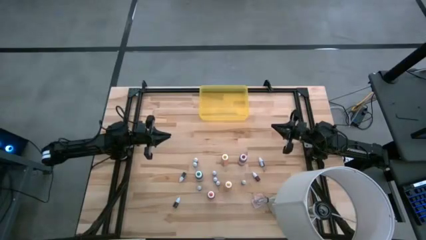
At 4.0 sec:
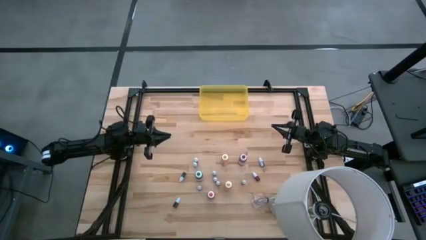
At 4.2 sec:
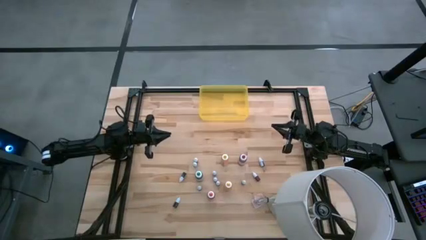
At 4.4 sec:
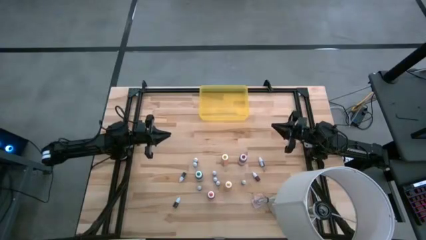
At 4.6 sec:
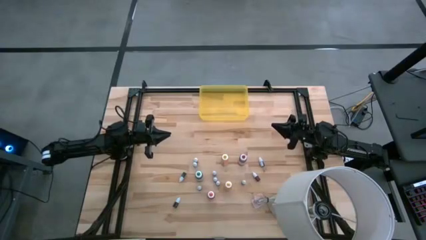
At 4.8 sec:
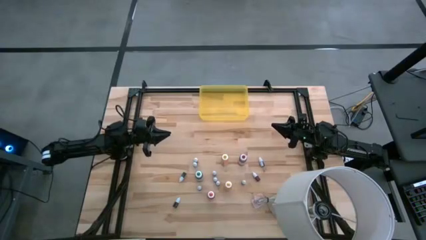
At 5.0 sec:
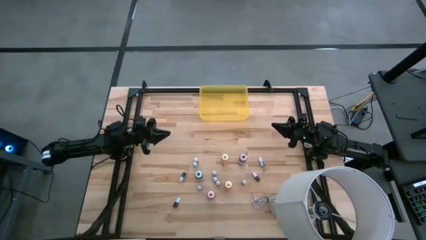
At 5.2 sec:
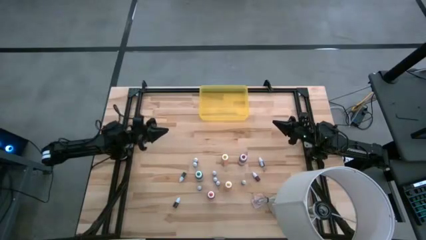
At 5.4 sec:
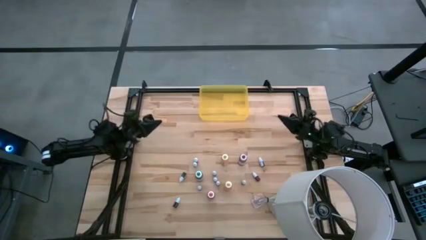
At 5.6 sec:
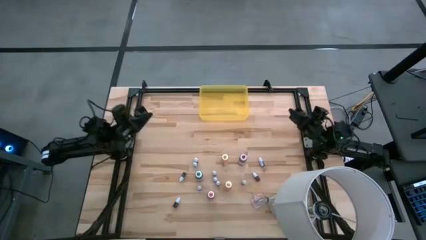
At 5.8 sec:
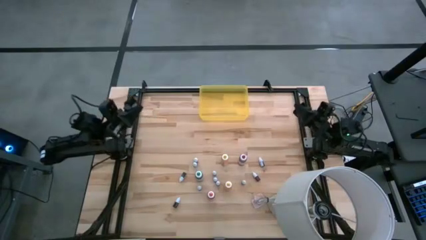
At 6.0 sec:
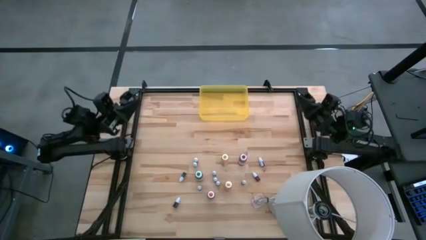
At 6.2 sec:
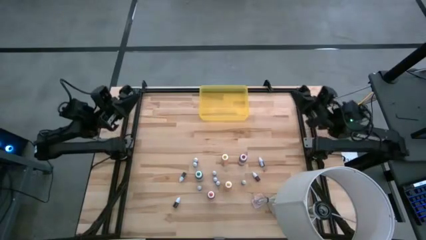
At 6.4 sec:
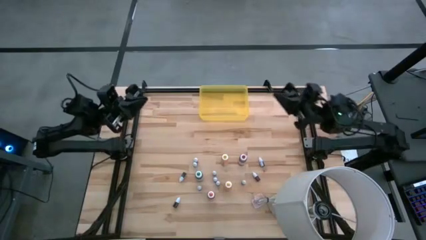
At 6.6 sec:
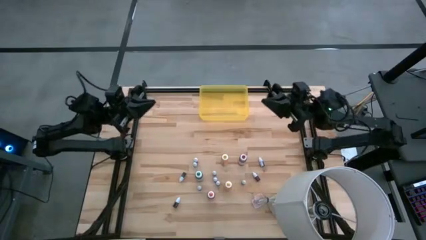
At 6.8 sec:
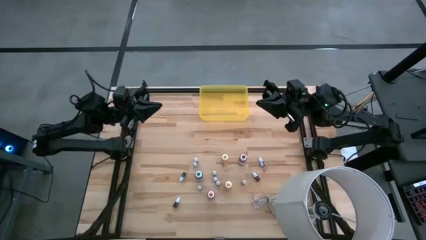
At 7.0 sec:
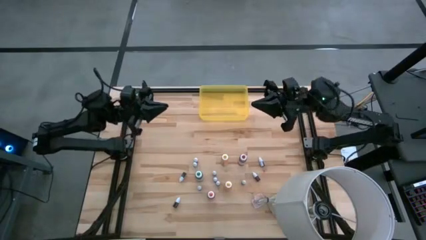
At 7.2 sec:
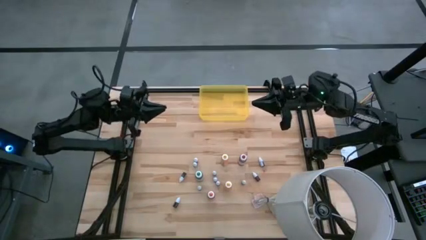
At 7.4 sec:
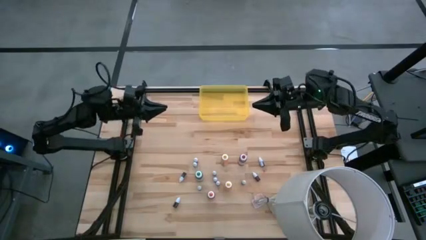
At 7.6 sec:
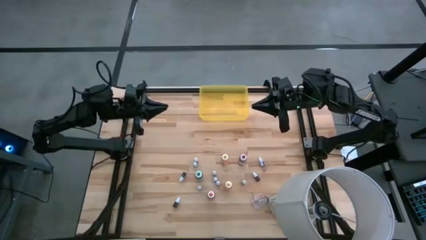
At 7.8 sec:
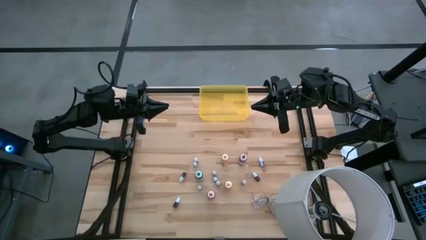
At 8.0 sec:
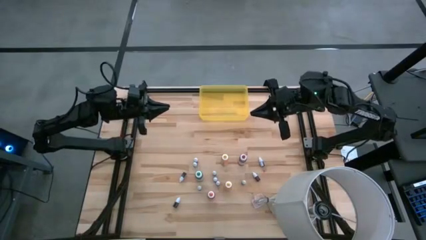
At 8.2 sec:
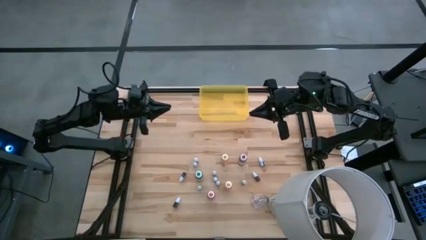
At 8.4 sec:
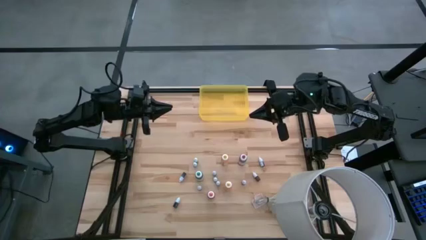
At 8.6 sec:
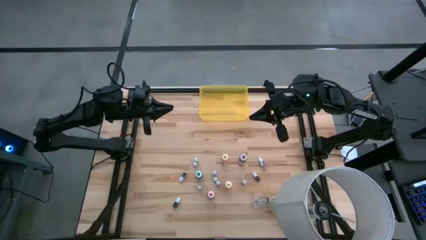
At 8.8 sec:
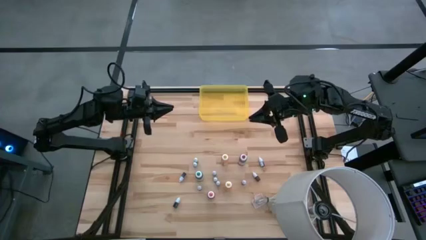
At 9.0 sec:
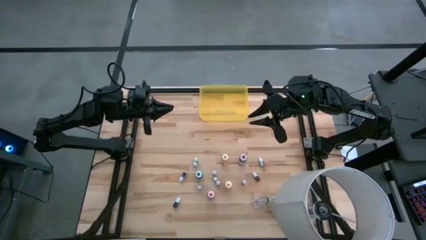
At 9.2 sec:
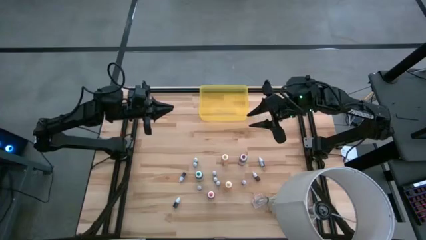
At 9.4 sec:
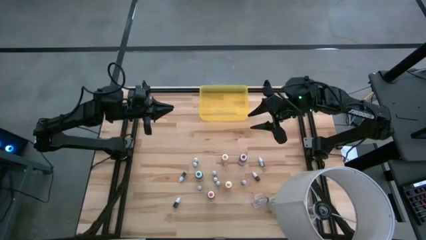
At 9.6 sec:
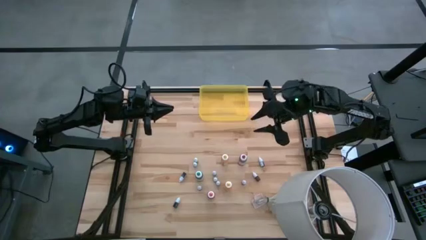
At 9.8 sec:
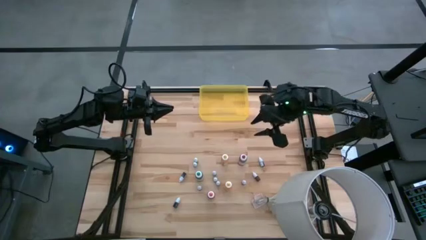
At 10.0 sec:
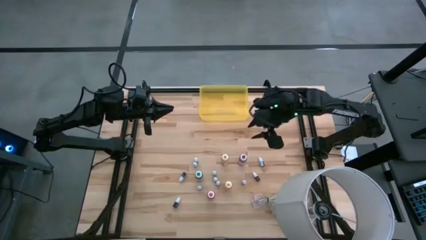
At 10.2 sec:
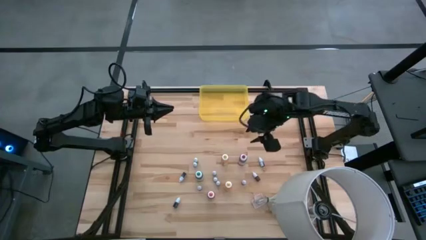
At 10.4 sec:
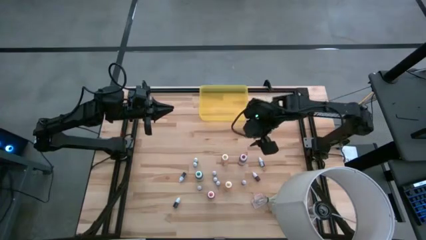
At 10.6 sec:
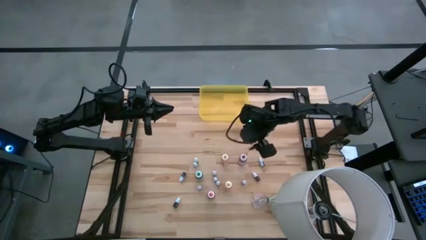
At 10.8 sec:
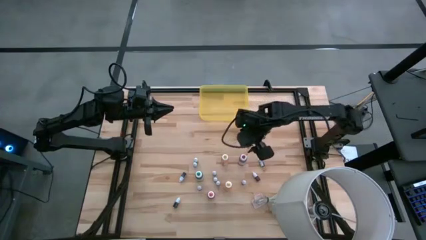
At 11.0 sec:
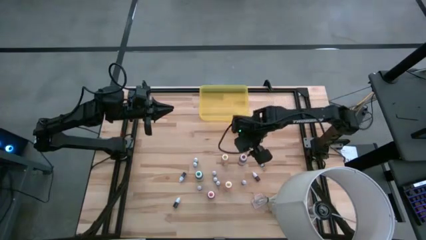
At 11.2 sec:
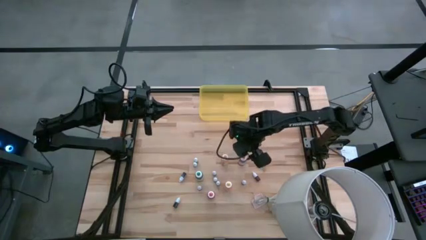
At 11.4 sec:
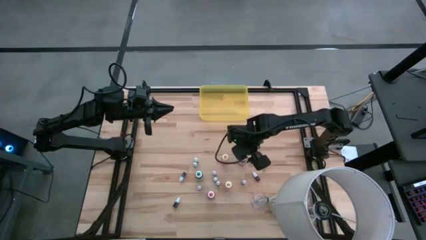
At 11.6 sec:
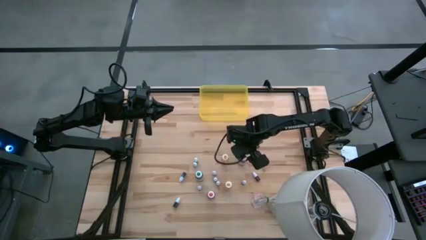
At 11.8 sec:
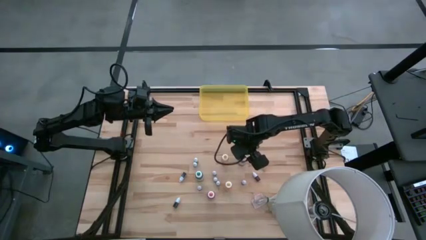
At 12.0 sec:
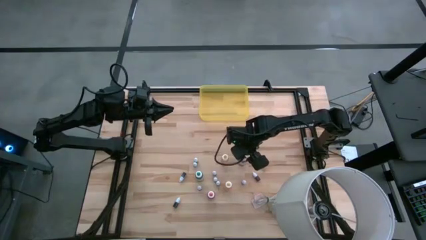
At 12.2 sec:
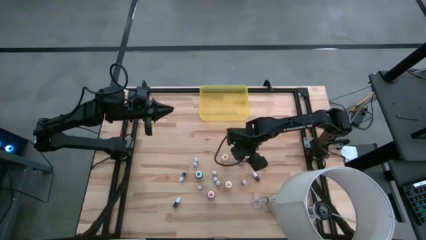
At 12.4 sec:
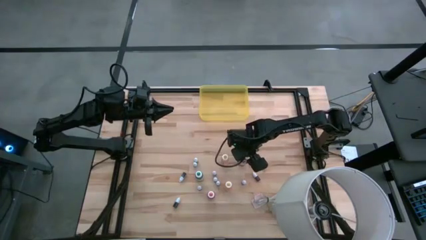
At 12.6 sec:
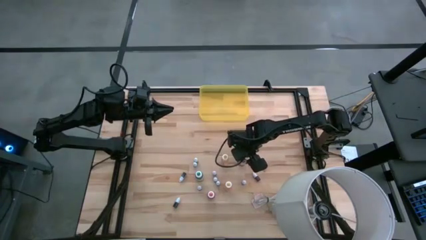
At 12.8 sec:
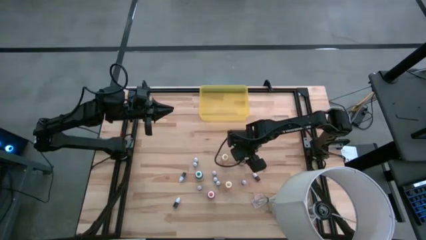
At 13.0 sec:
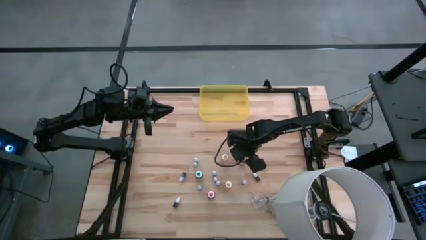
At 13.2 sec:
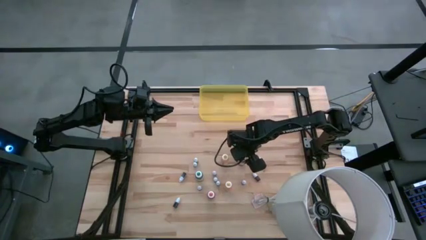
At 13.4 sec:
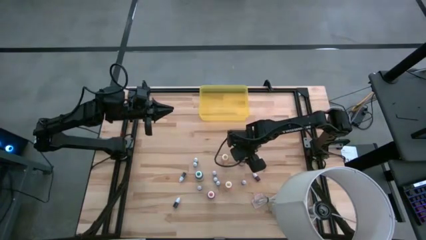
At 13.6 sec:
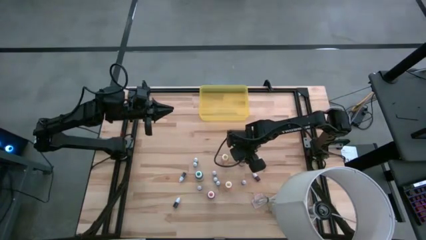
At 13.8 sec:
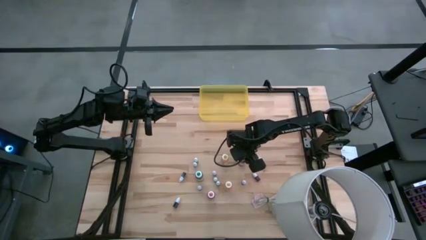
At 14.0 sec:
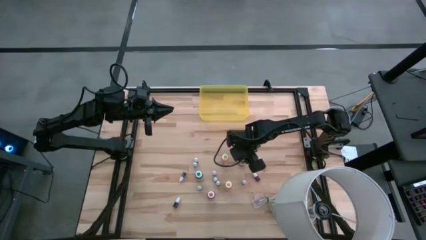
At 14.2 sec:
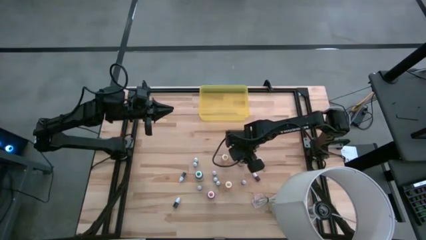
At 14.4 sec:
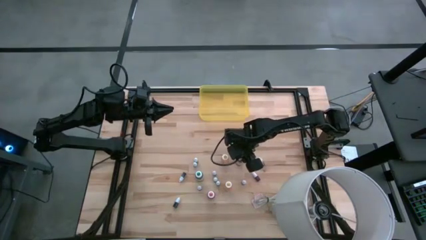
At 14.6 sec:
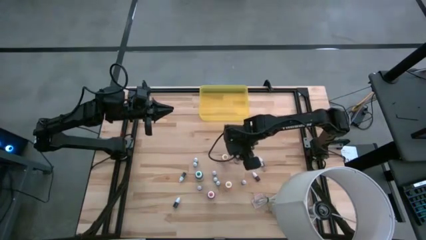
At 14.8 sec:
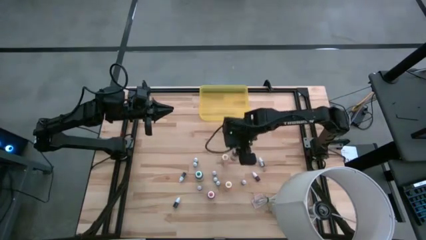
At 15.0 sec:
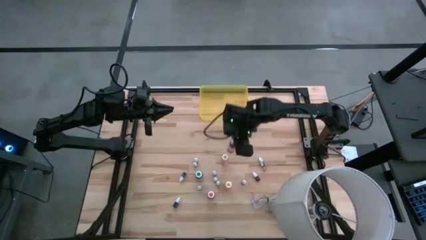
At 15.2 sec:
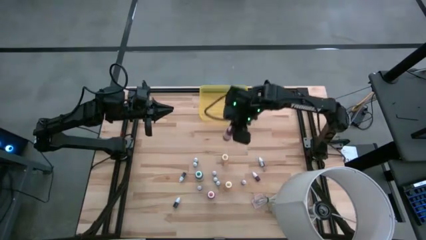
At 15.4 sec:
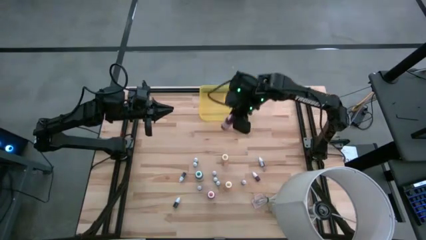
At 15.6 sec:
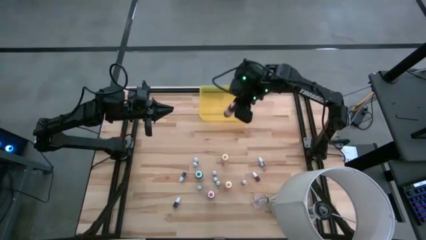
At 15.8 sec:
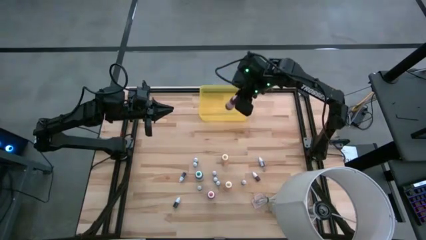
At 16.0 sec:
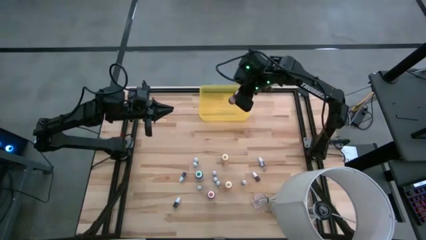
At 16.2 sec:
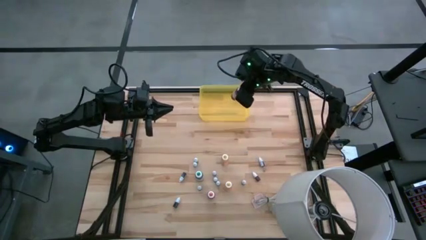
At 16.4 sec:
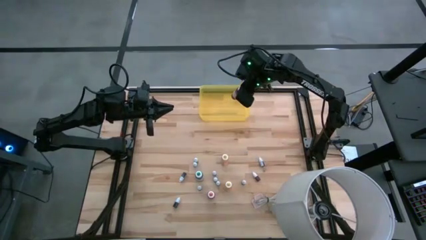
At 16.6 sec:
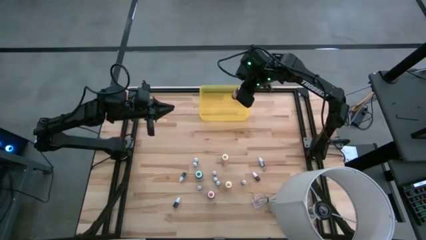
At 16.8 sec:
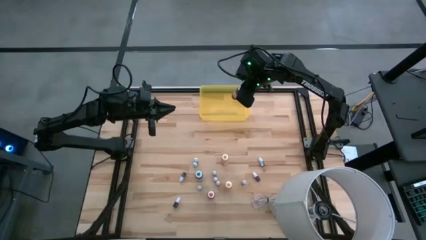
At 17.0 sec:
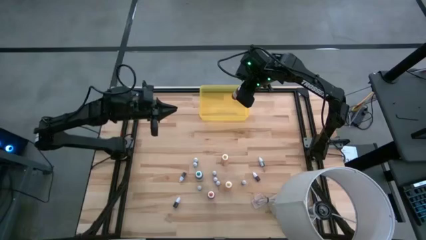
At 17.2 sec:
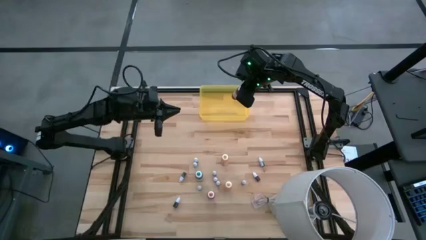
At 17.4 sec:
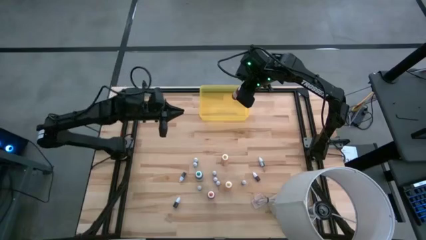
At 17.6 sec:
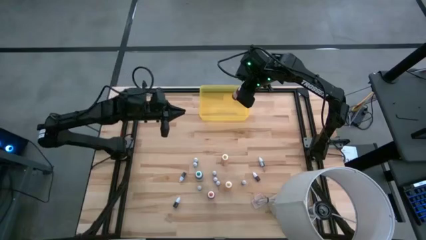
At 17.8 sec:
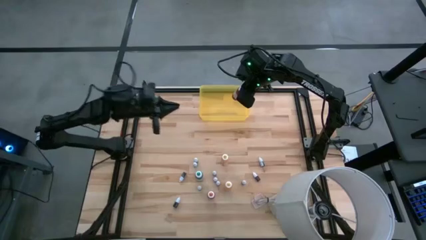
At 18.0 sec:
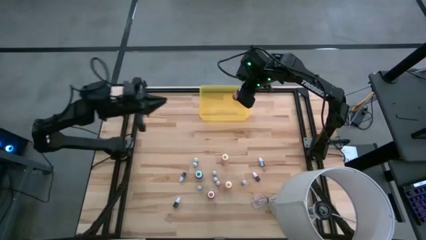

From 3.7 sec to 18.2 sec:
Task: Pick & Place food coloring
Put the large red food coloring bottle into the yellow bin
